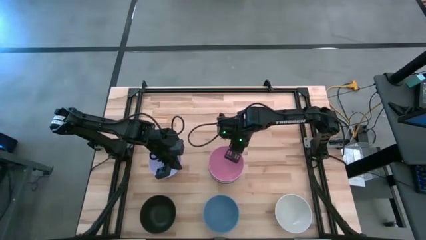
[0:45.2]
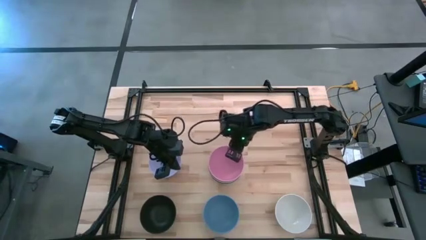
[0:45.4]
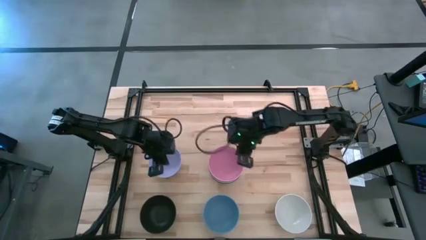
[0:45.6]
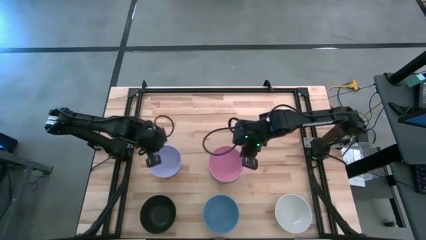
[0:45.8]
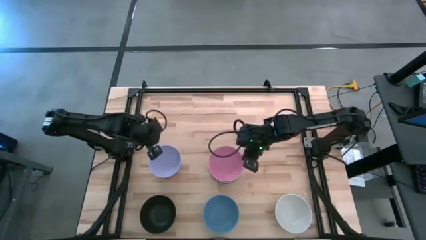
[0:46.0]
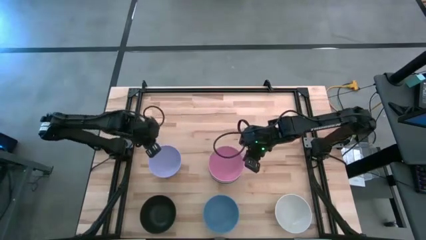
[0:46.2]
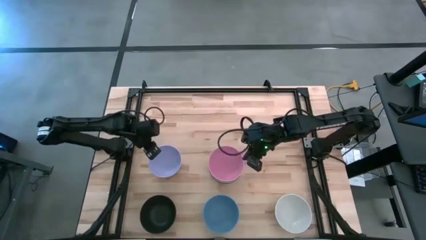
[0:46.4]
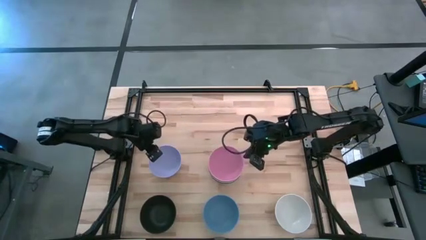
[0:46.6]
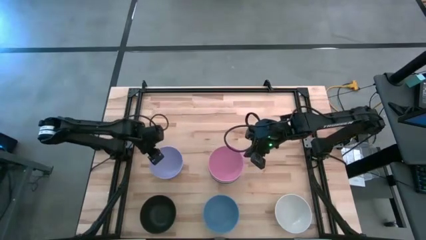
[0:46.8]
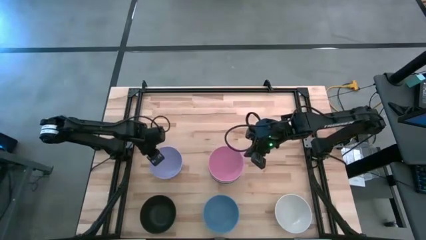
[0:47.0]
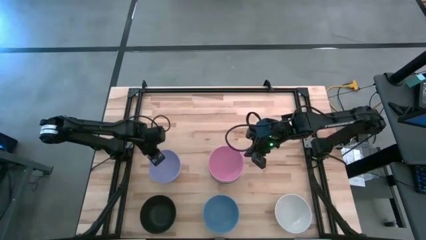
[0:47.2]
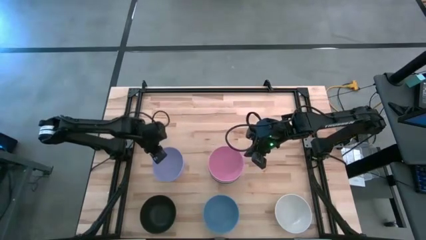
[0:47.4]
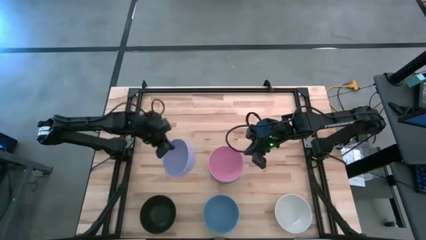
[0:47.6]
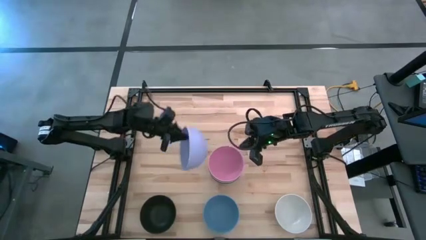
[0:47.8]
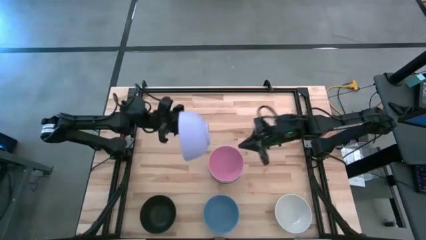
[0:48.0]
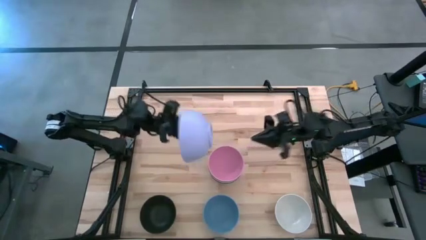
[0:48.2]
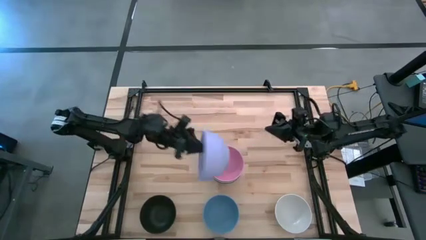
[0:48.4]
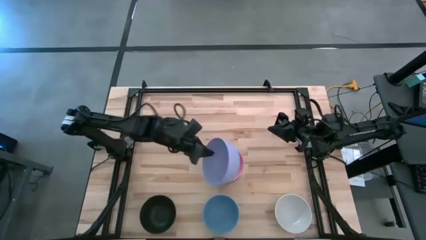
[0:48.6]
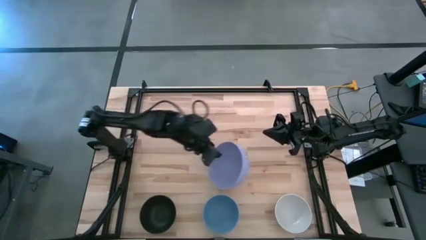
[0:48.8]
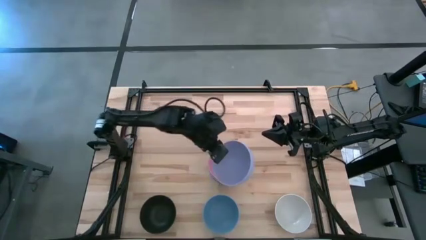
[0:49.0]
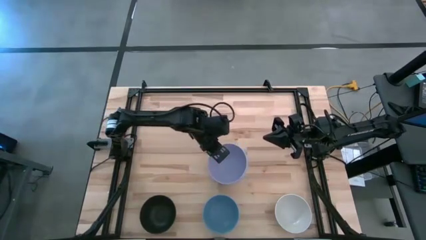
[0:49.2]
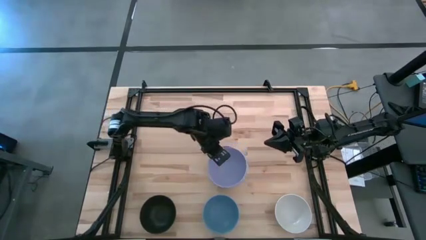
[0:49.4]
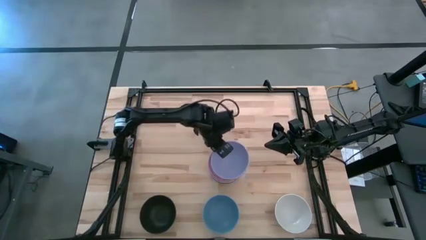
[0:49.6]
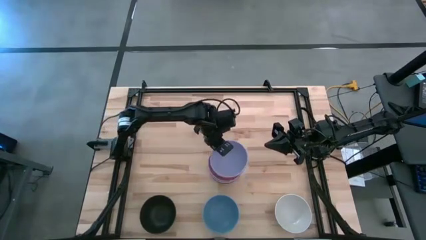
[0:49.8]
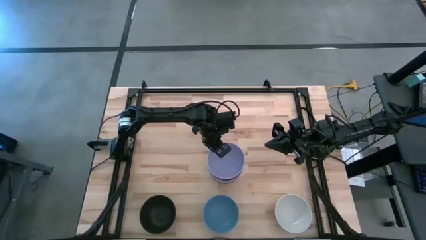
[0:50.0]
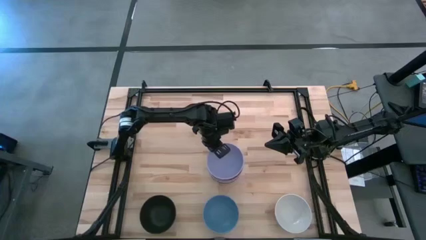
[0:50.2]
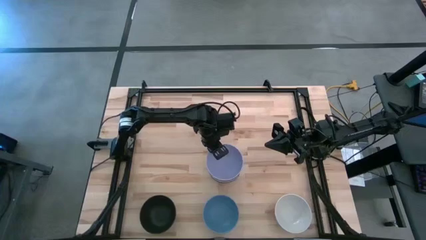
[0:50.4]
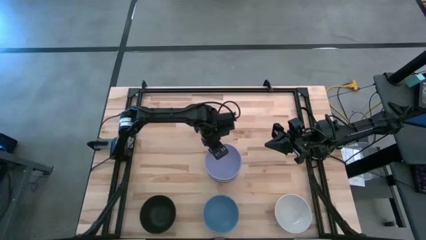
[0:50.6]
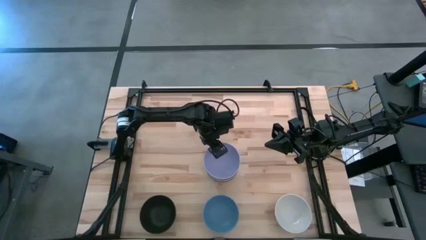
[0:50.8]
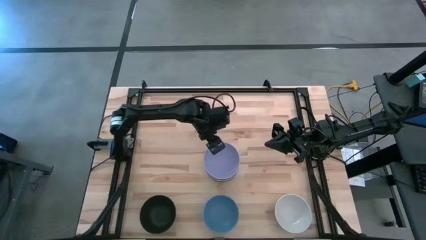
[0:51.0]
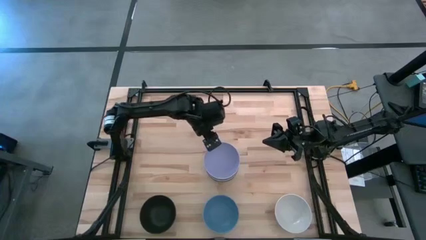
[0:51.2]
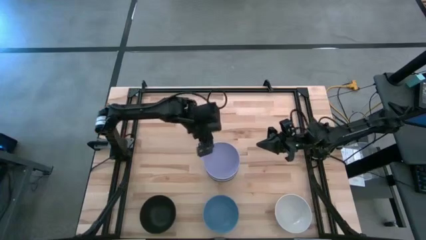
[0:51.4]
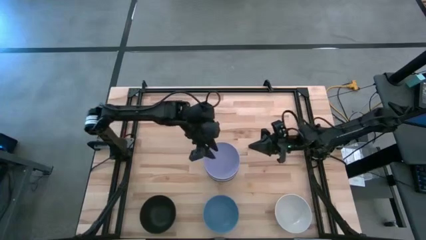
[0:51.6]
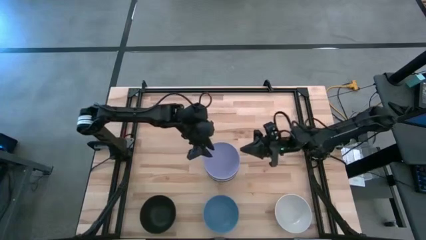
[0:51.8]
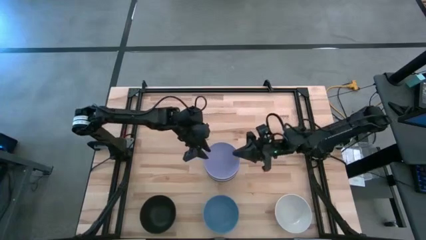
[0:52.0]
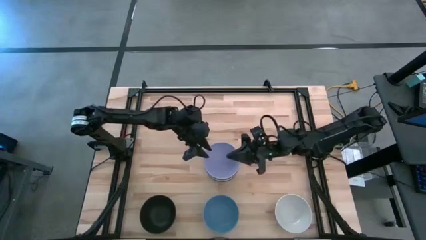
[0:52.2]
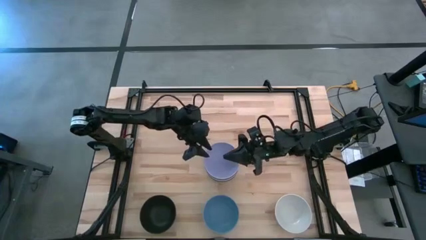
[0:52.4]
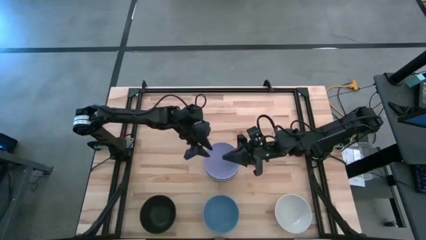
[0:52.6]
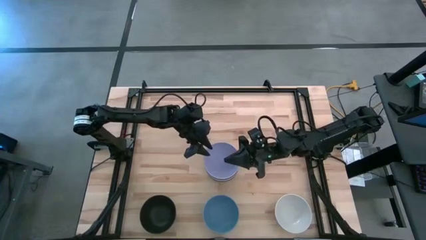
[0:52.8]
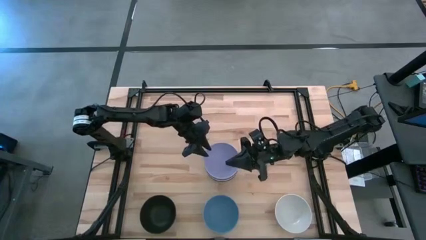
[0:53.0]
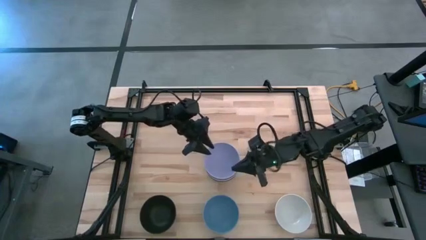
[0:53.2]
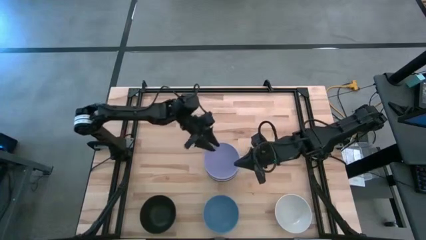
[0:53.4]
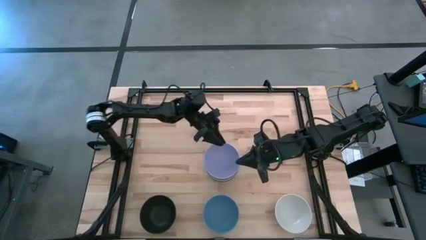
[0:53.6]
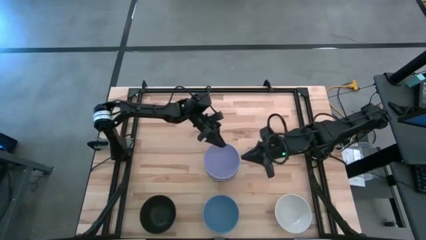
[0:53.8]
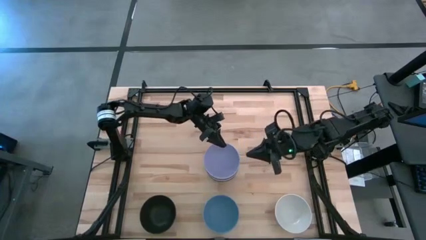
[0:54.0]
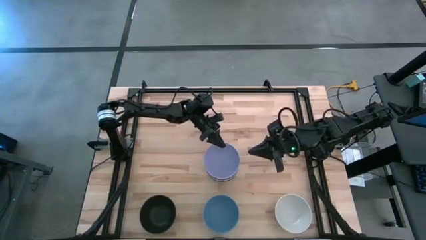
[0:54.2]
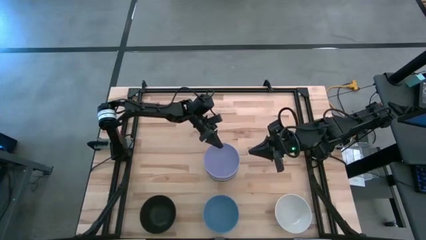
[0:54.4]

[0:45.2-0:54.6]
Task: Nest bowls inside each other
Stack the light violet bowl into the pink bowl

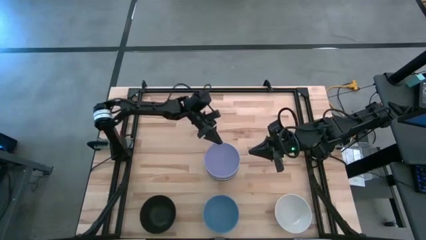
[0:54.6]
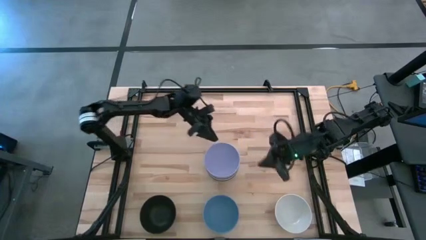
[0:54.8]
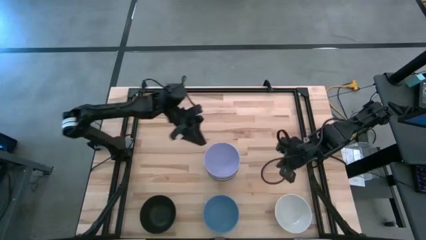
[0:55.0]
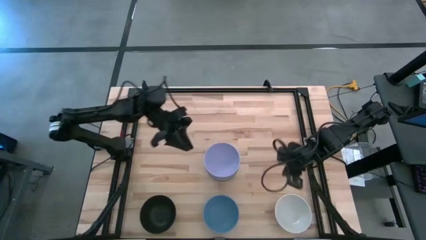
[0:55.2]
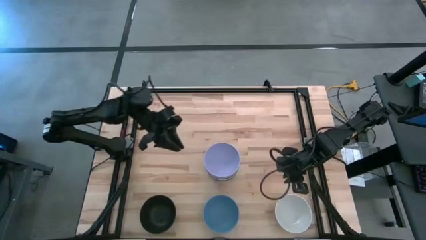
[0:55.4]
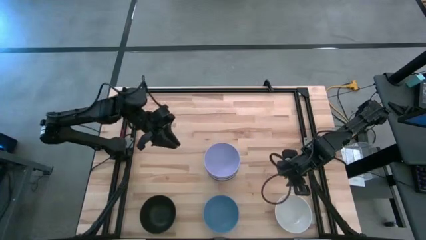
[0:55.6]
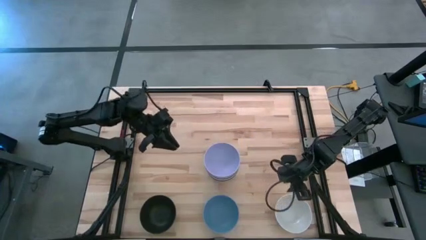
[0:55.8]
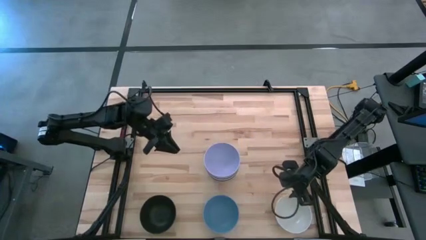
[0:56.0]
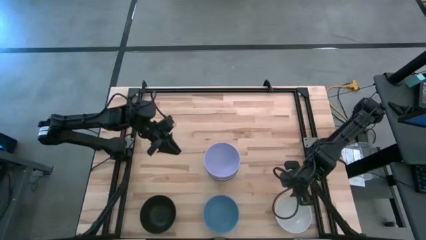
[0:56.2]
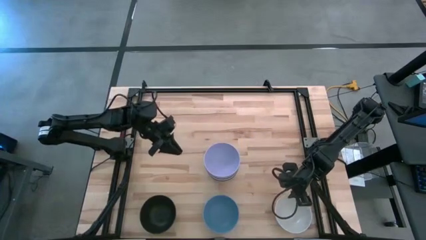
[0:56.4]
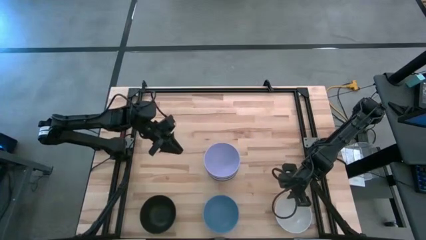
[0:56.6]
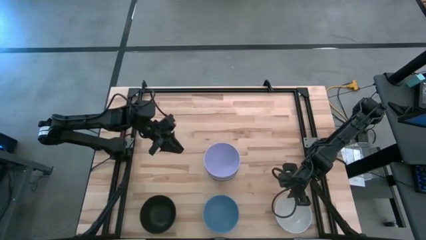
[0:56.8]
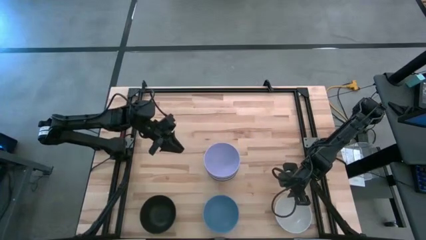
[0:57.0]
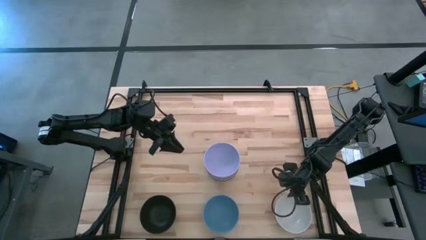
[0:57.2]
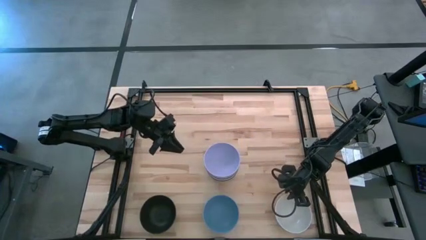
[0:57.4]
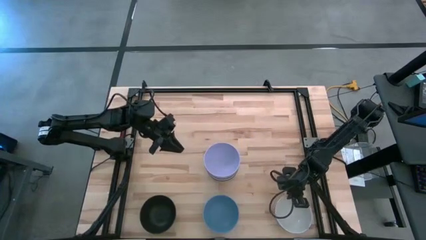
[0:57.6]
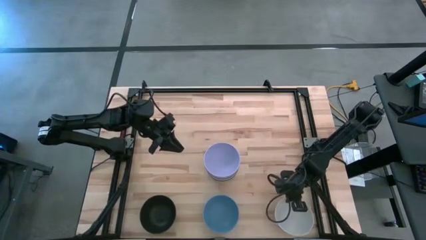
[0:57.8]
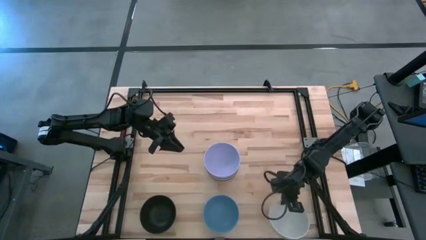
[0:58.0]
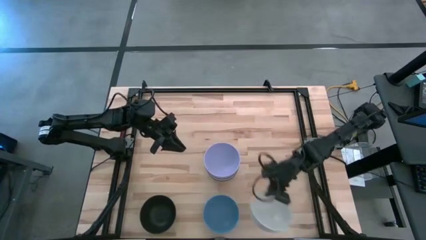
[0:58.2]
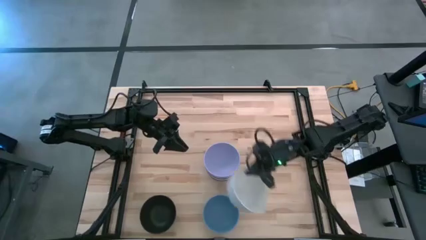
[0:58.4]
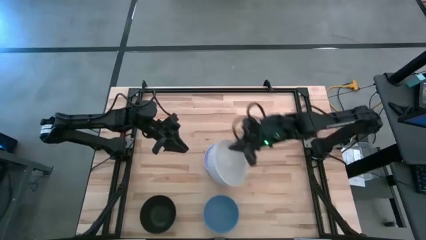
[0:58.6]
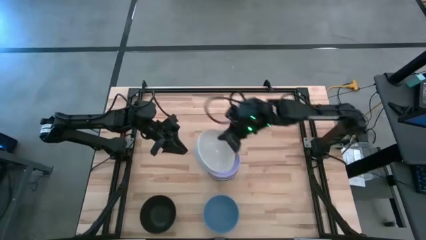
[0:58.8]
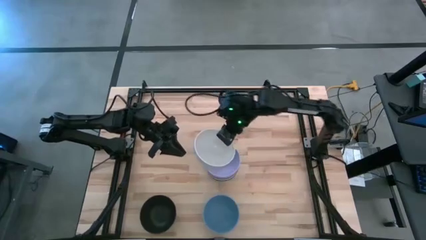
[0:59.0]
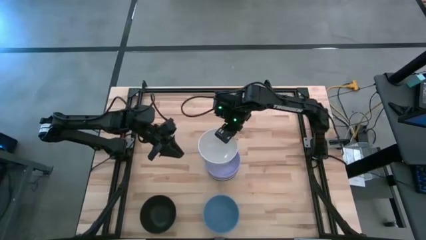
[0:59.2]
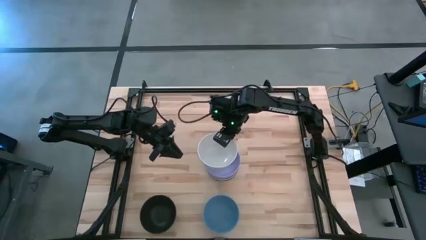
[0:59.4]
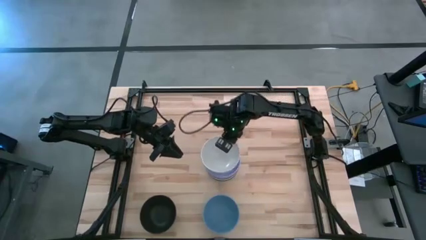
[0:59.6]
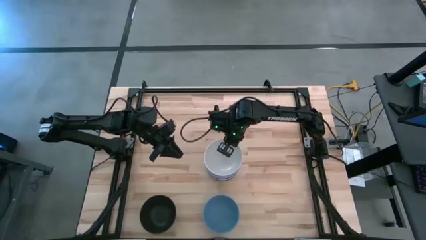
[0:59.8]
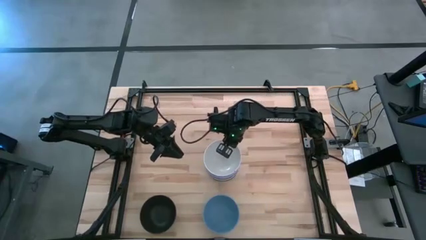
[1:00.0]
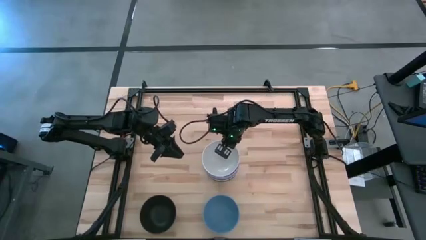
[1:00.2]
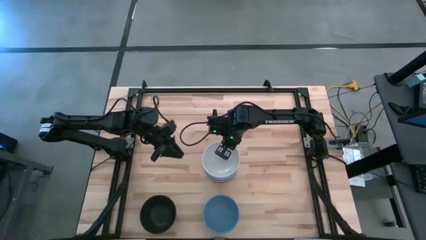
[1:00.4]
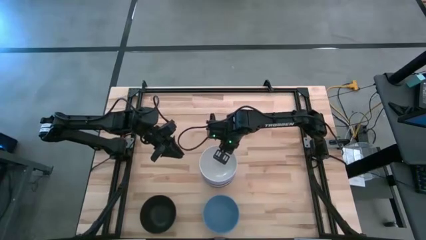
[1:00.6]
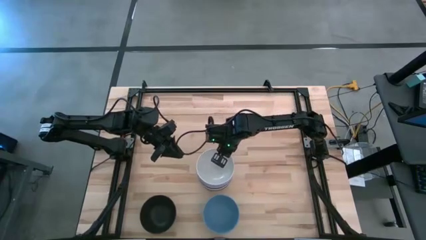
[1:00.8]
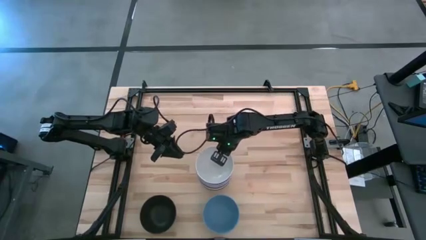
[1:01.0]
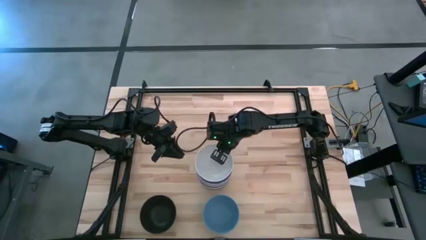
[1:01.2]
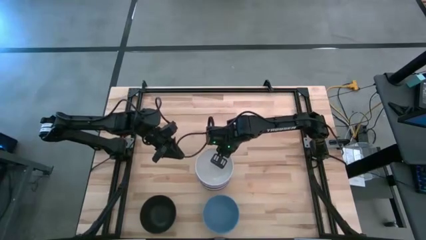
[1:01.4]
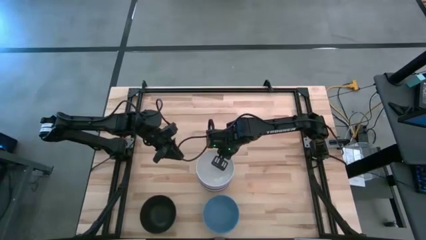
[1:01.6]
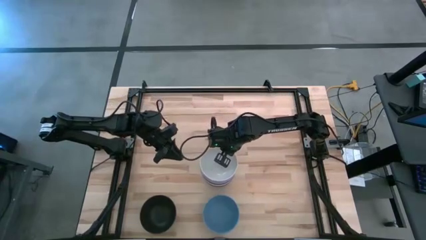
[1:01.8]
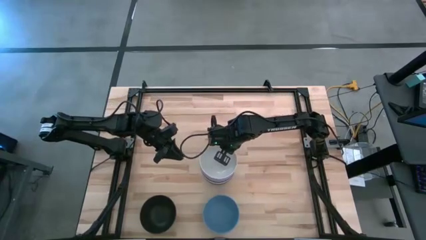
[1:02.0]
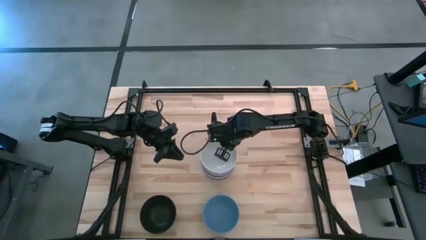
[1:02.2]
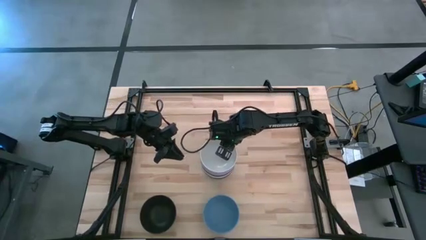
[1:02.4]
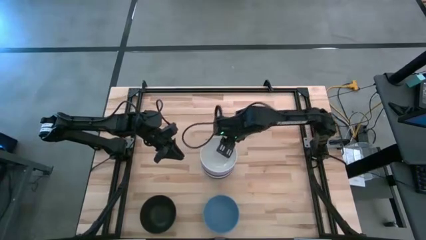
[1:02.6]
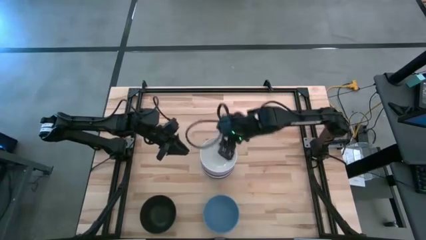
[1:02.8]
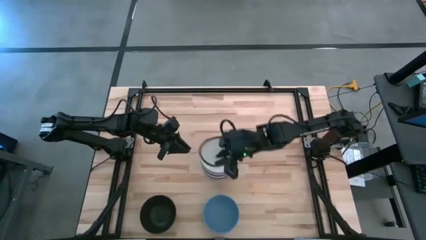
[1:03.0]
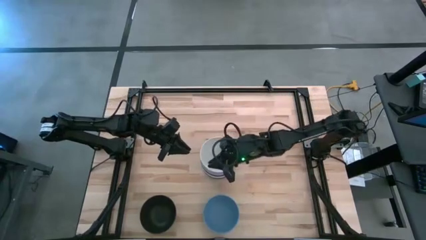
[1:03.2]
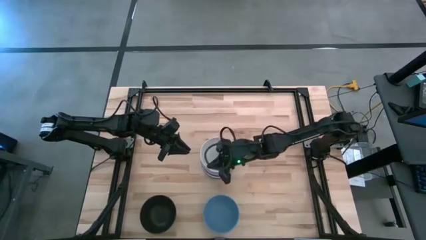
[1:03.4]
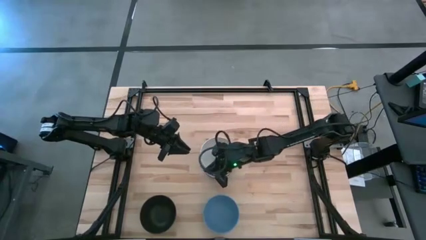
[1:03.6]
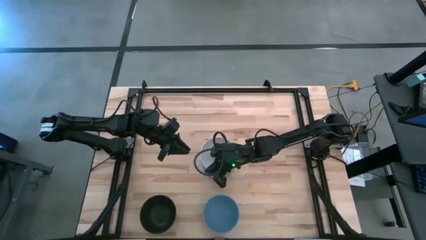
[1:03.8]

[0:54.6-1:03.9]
Stack the white bowl into the light violet bowl
